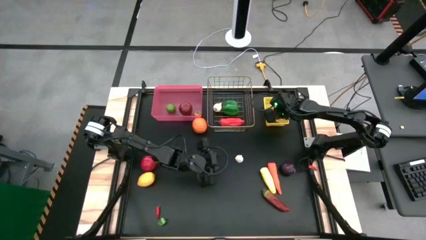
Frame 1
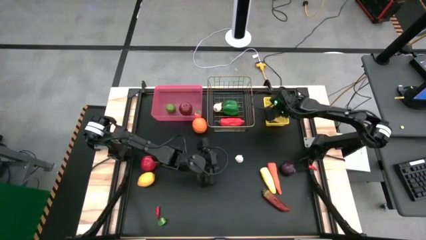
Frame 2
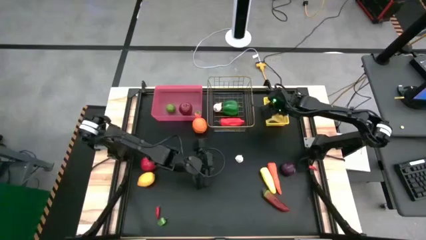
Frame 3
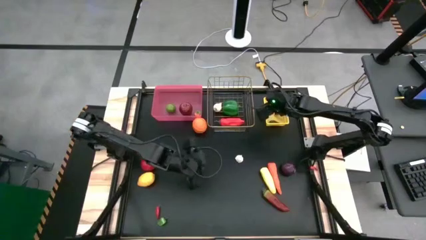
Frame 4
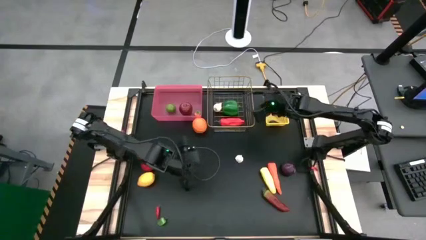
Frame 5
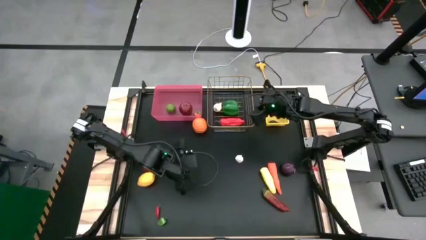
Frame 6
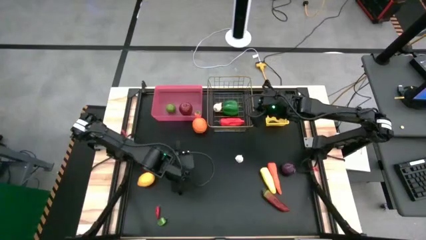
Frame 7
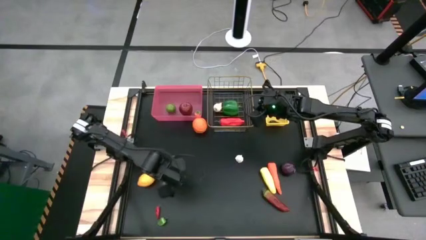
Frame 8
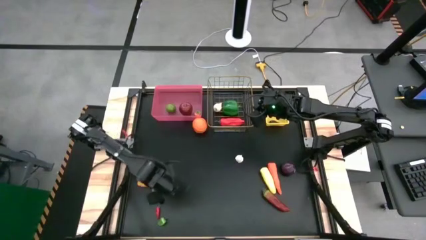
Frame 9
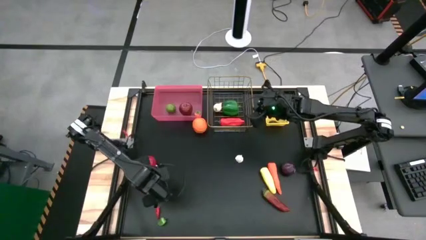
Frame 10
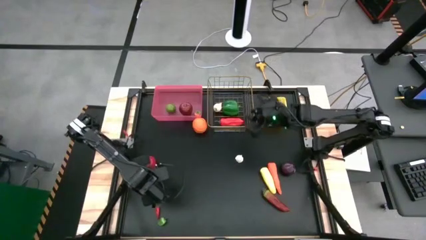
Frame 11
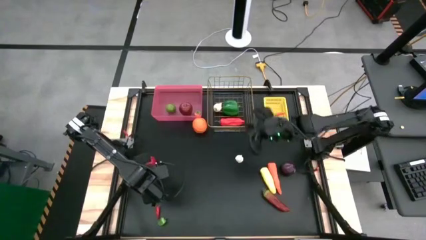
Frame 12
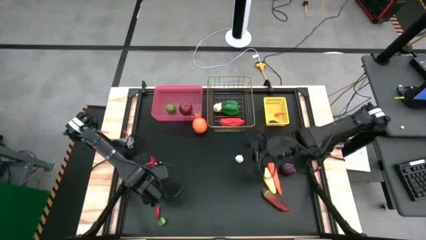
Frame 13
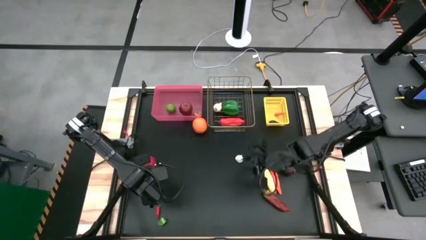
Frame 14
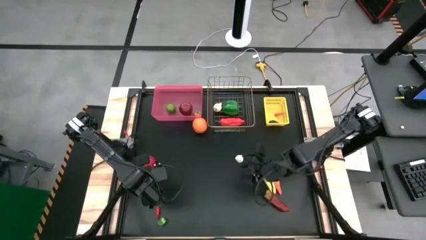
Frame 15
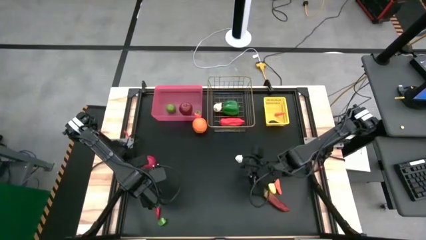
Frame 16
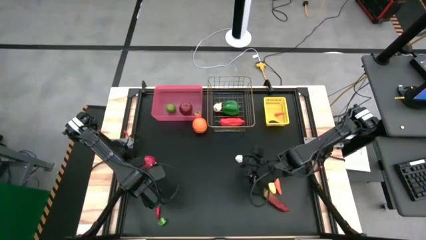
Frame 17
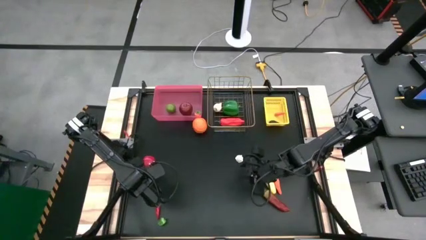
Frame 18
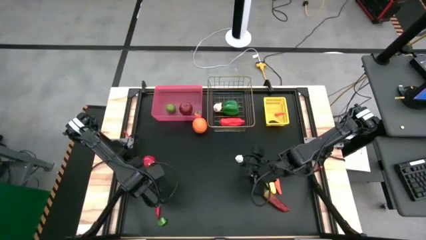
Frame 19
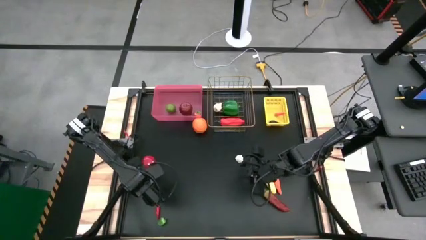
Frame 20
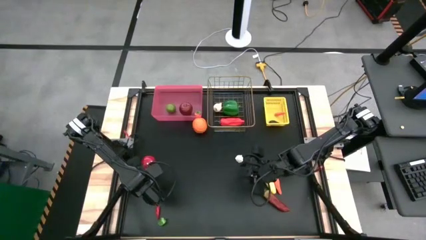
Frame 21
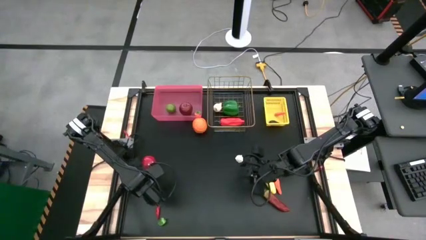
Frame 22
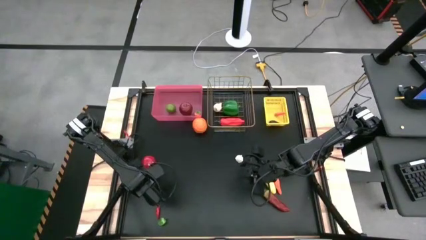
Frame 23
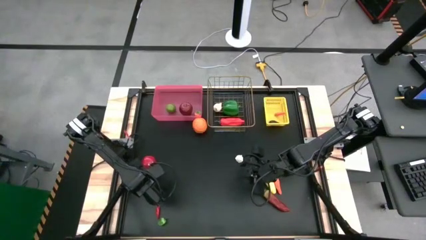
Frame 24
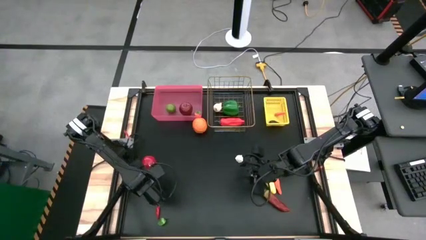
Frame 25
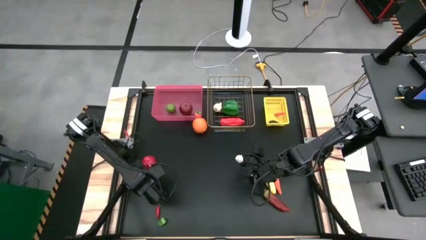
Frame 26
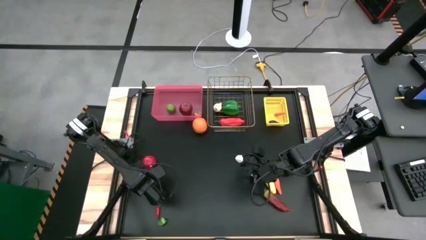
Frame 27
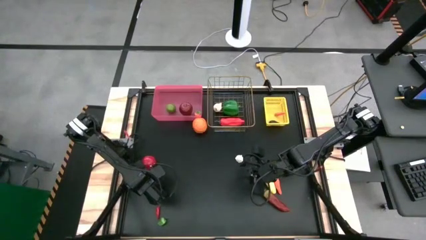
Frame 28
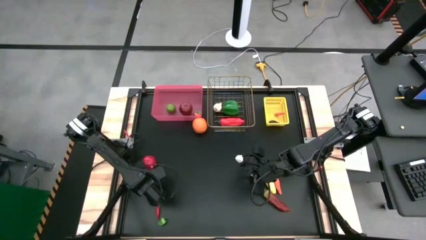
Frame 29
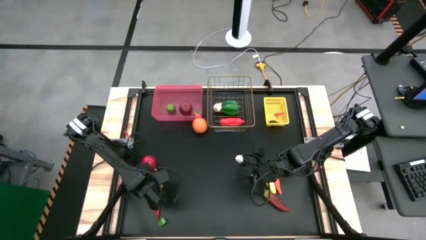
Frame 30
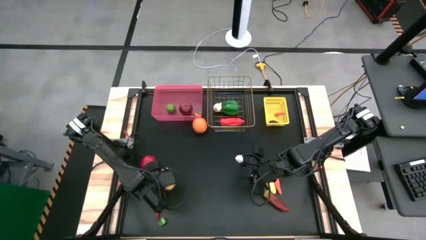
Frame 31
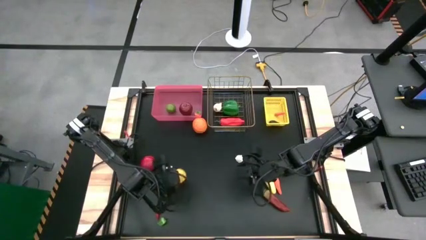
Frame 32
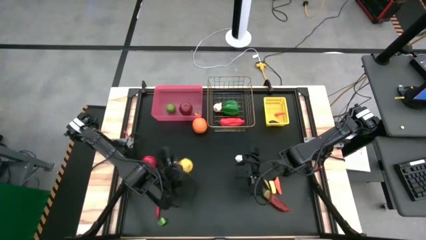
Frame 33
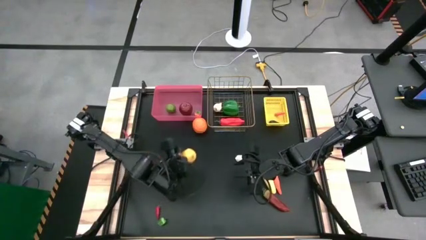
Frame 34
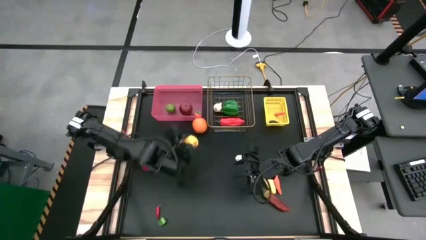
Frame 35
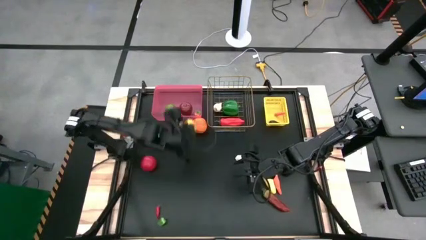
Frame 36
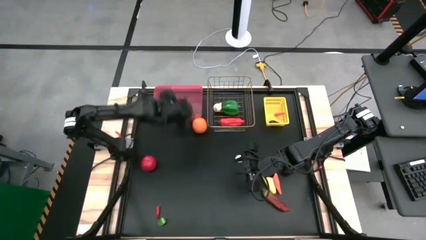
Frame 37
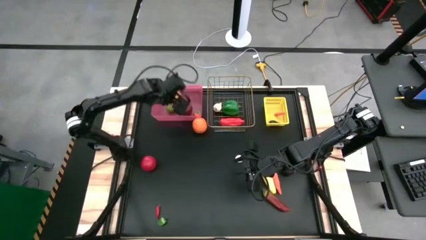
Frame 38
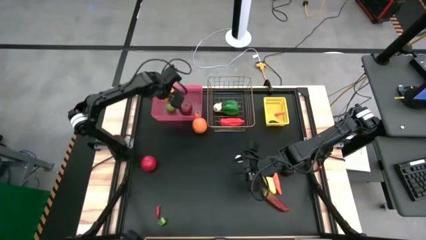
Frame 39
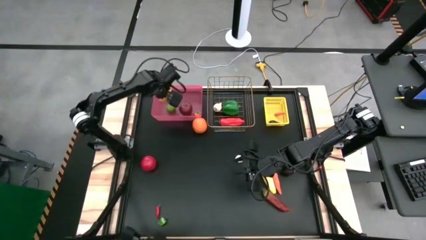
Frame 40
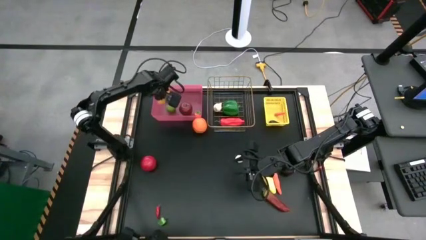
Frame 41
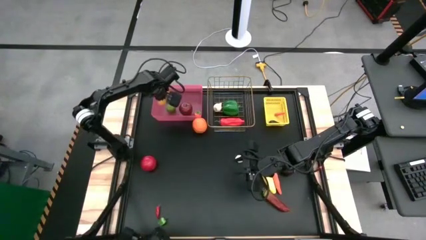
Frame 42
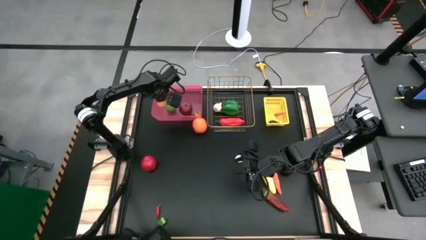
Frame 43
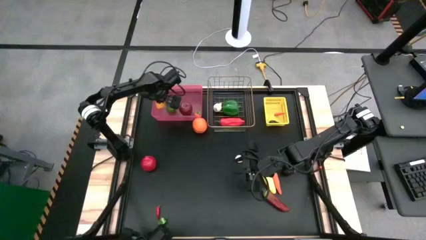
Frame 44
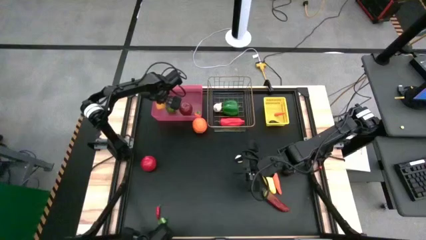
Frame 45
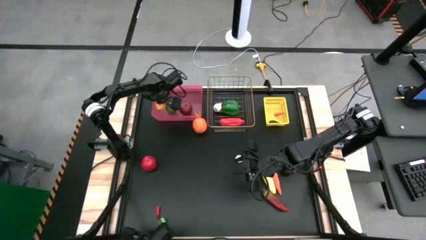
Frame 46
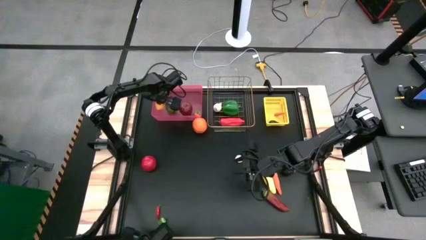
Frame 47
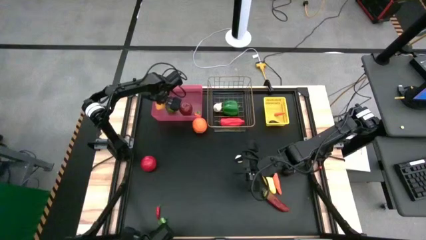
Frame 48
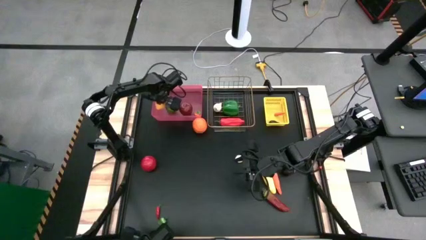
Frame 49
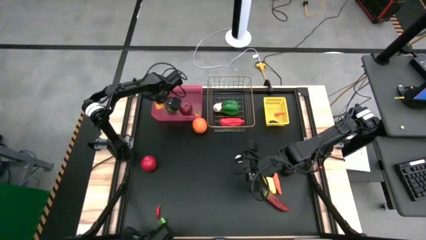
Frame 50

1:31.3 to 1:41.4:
Task: Sort produce into baskets
Put the yellow lemon into the red bin

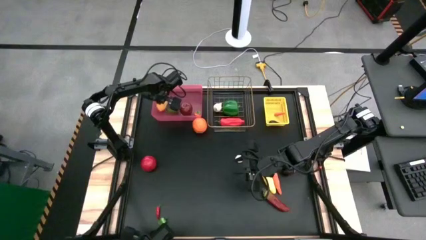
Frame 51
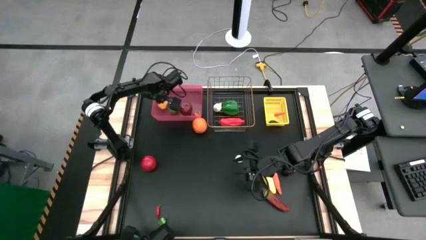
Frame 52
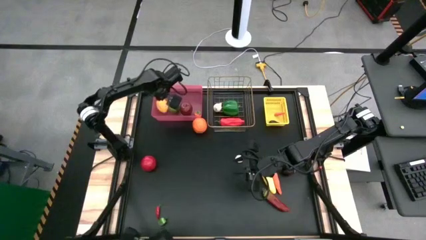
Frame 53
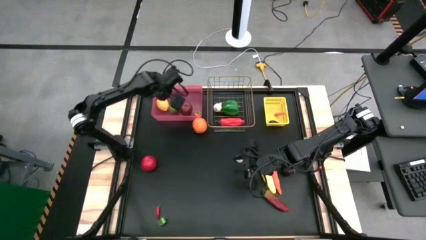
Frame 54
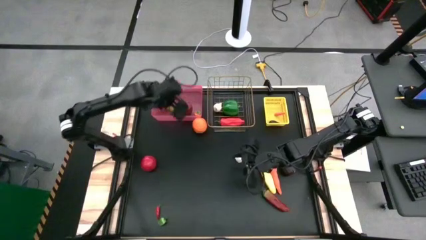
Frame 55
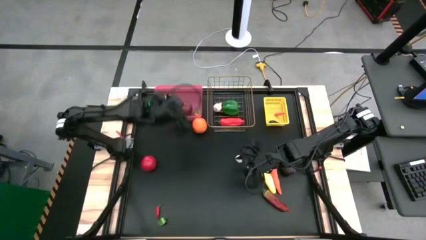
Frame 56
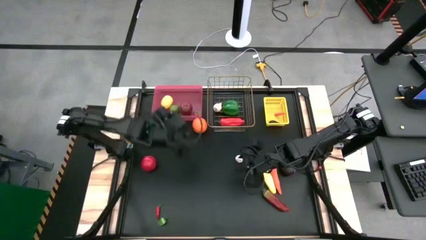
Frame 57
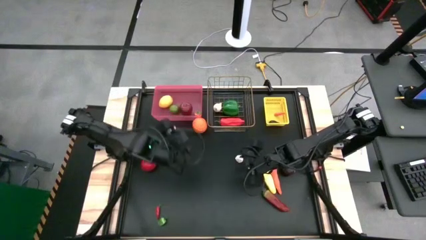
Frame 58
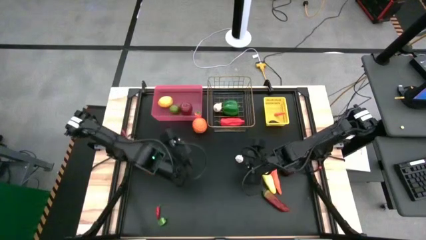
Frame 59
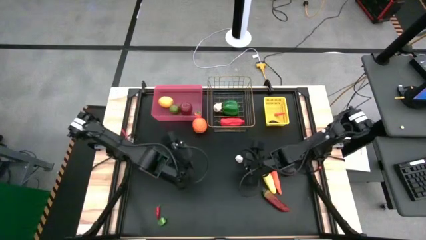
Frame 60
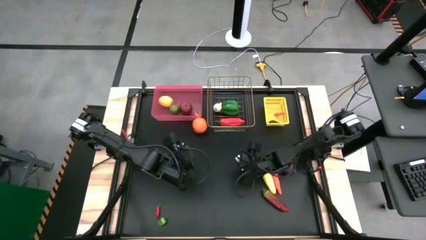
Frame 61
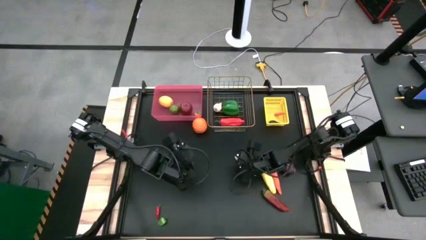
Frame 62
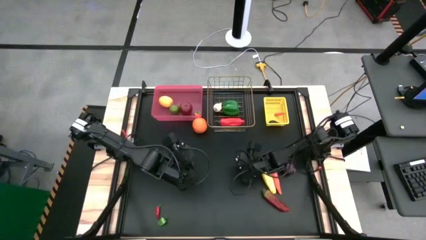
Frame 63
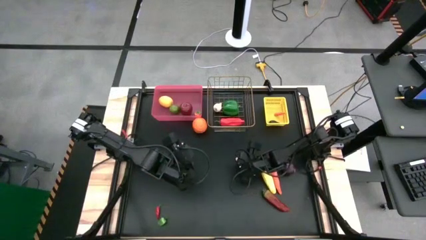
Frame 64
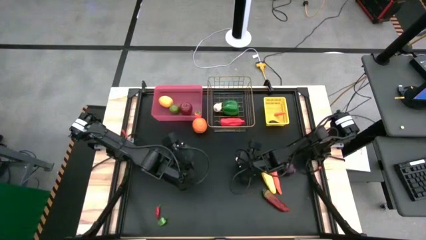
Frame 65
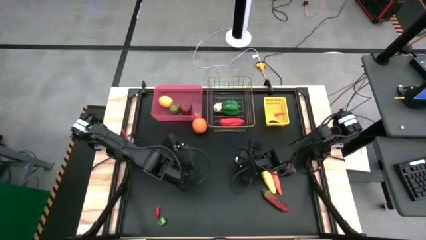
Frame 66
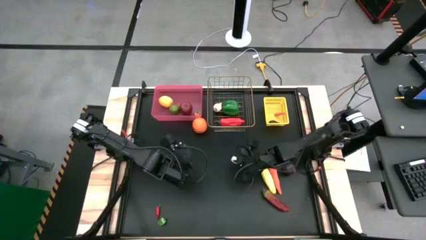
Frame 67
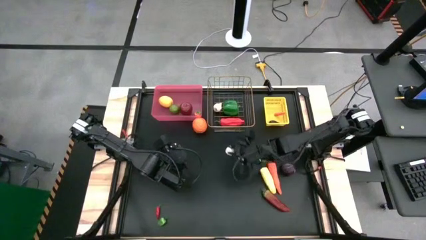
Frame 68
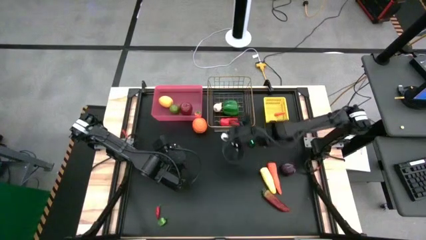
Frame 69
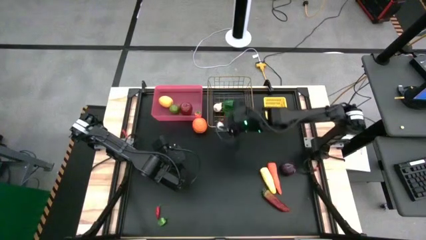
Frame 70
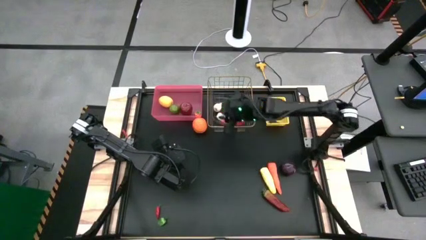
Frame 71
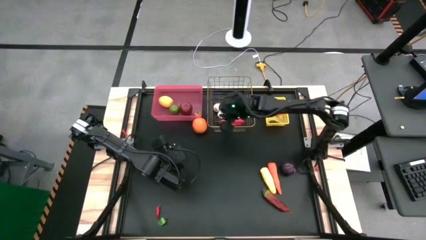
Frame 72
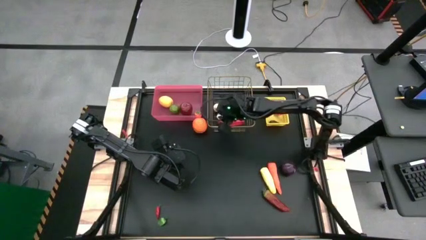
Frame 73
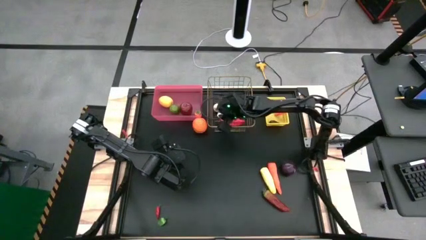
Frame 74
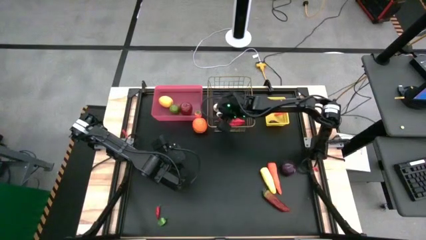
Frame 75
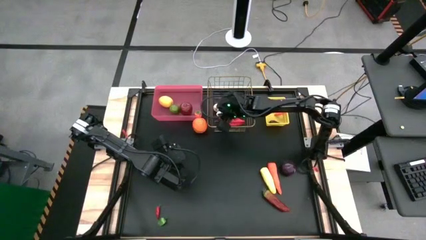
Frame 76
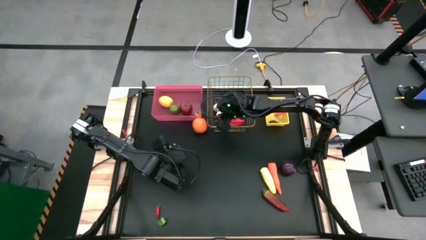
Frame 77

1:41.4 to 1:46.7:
Put the white garlic into the gold mesh basket
